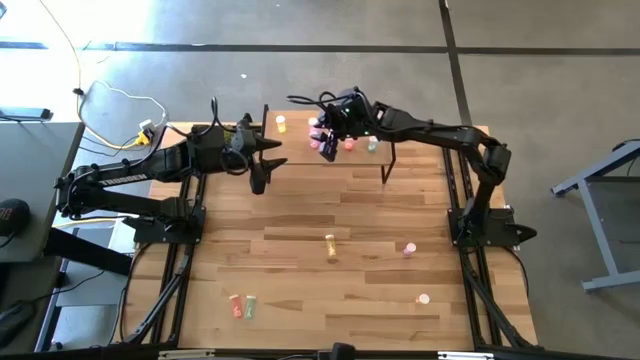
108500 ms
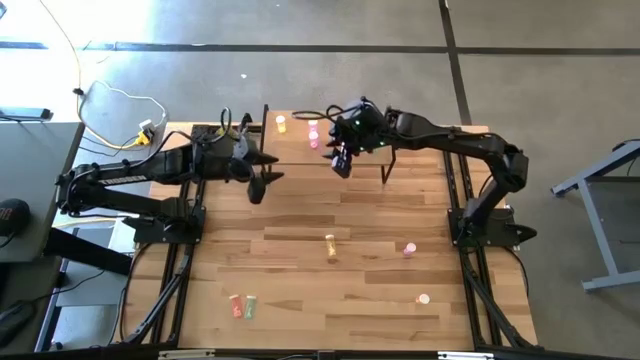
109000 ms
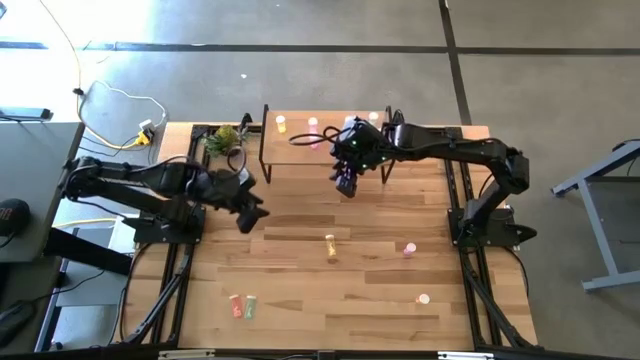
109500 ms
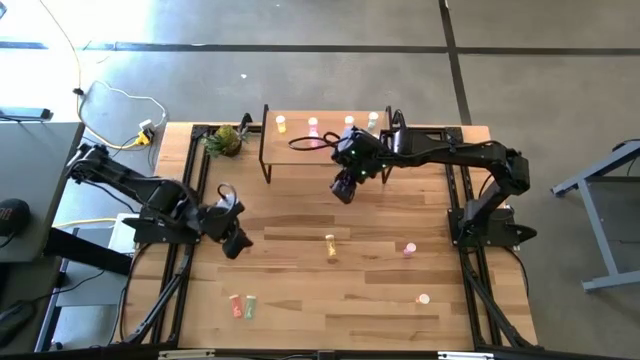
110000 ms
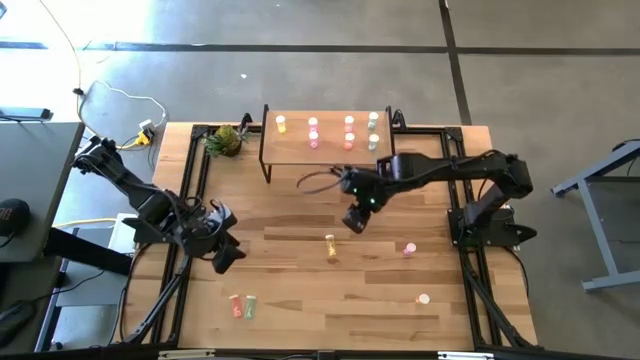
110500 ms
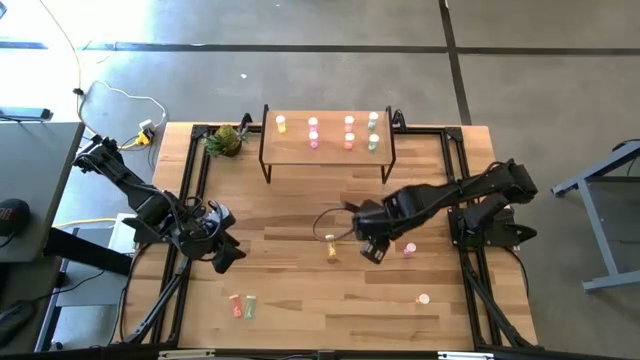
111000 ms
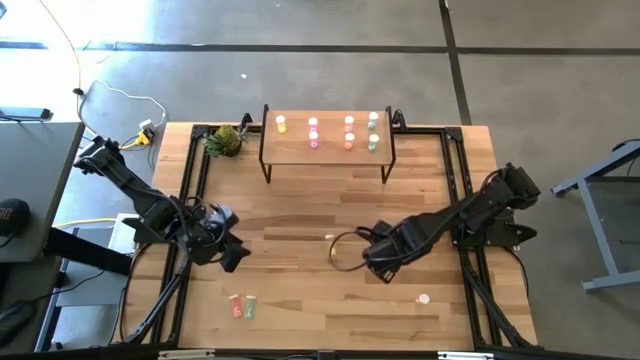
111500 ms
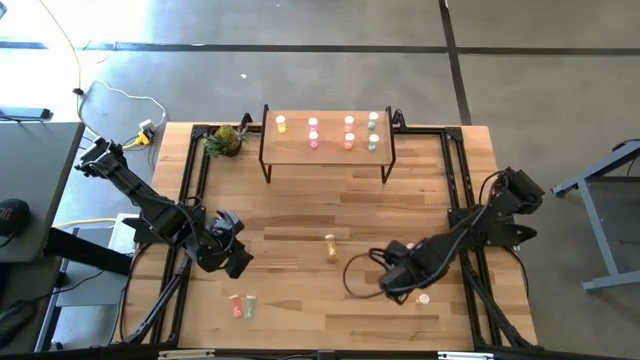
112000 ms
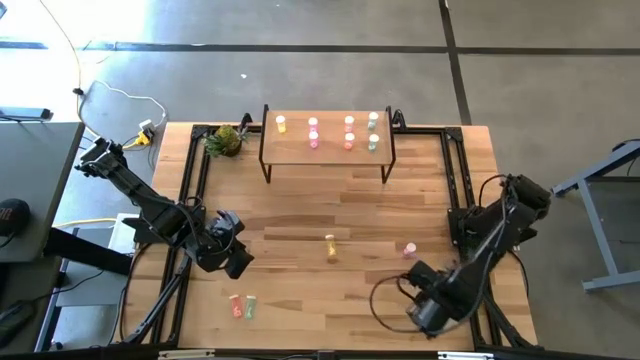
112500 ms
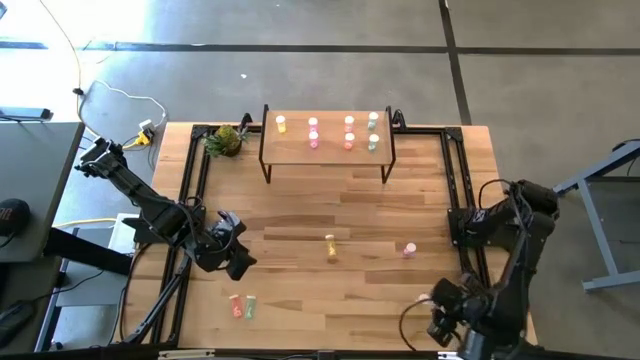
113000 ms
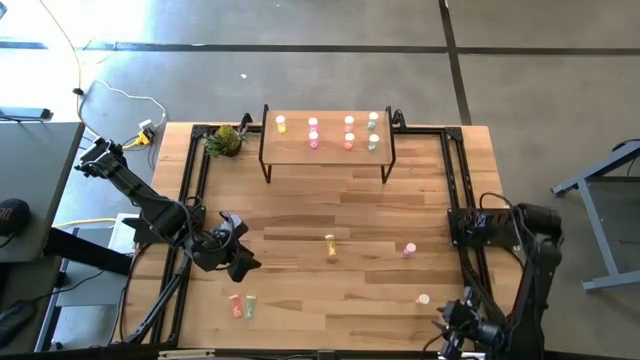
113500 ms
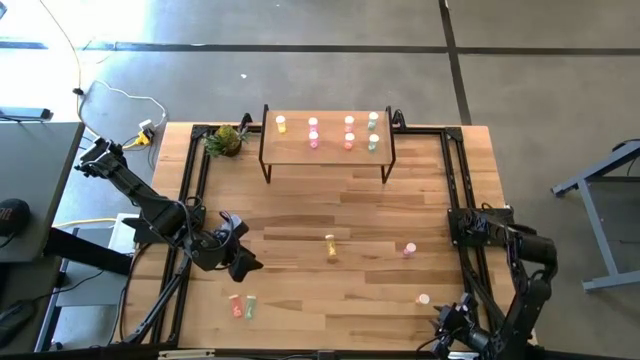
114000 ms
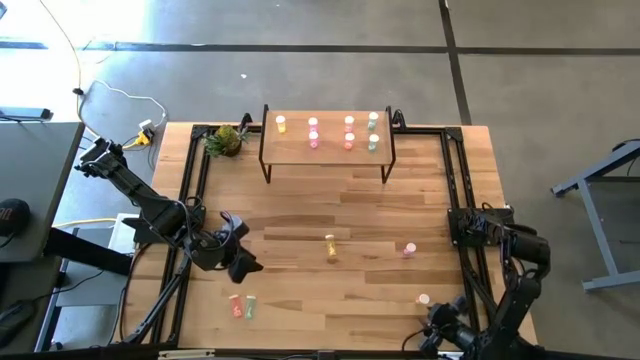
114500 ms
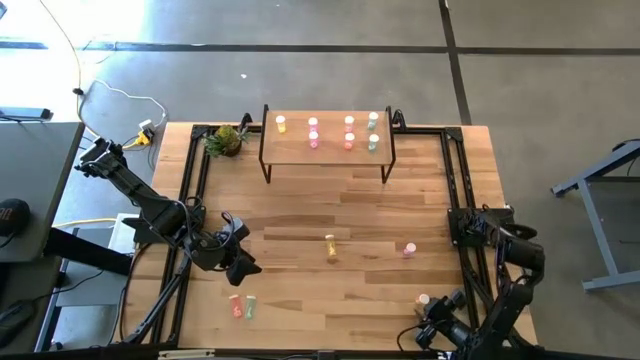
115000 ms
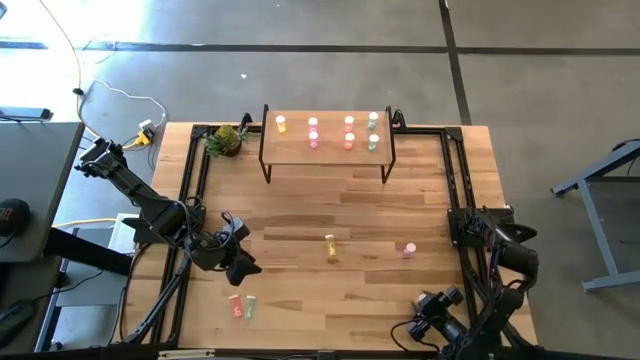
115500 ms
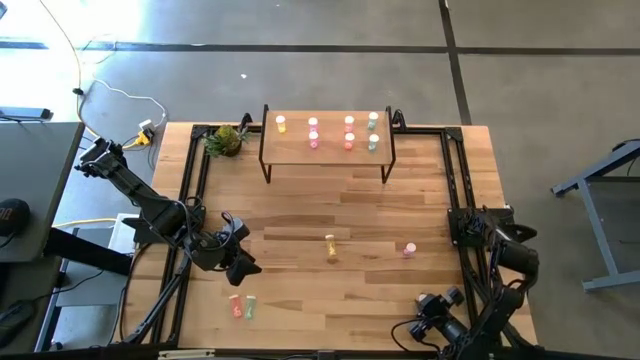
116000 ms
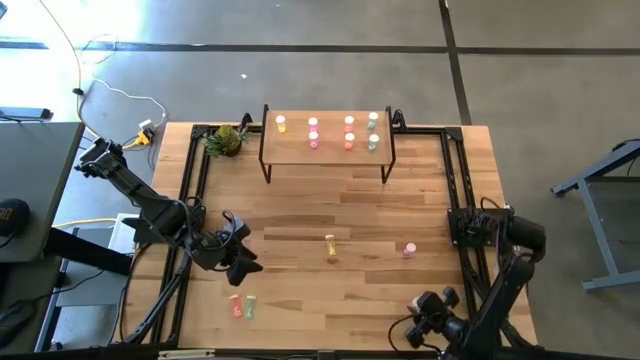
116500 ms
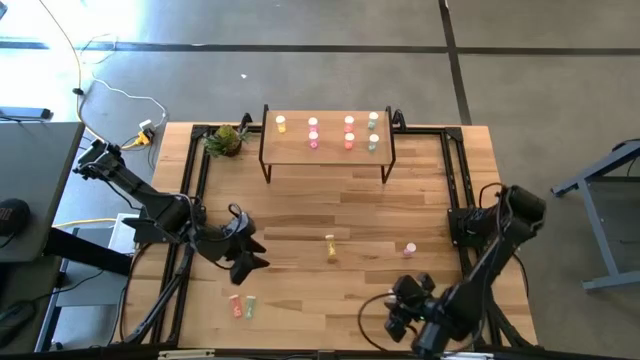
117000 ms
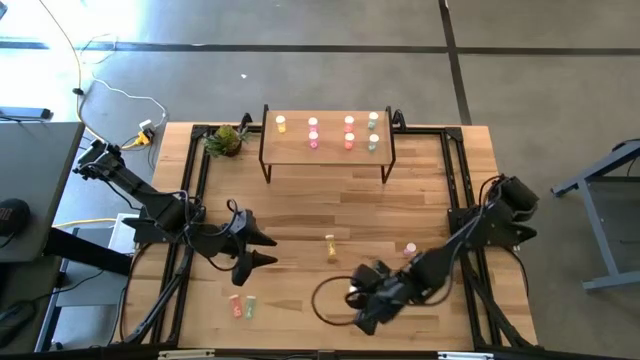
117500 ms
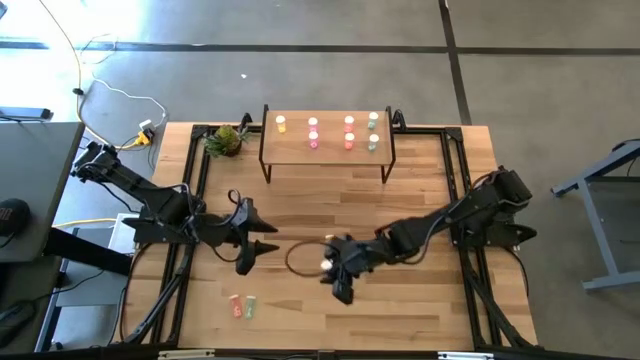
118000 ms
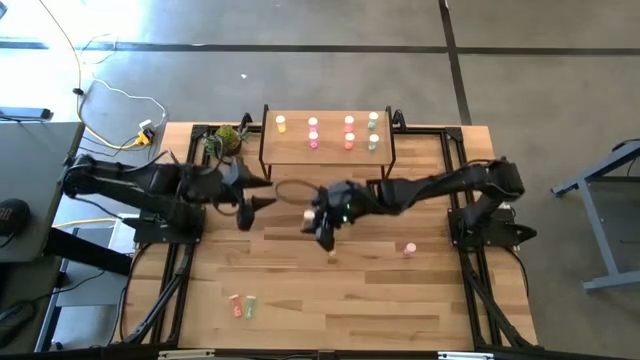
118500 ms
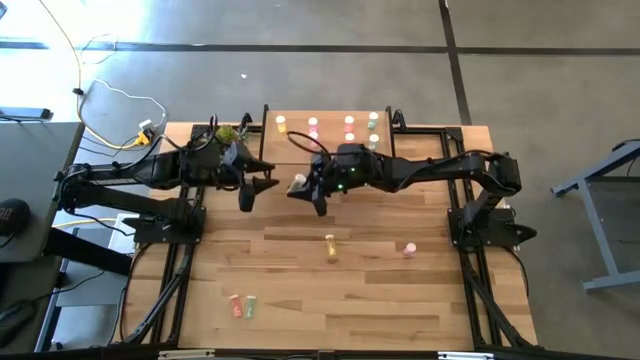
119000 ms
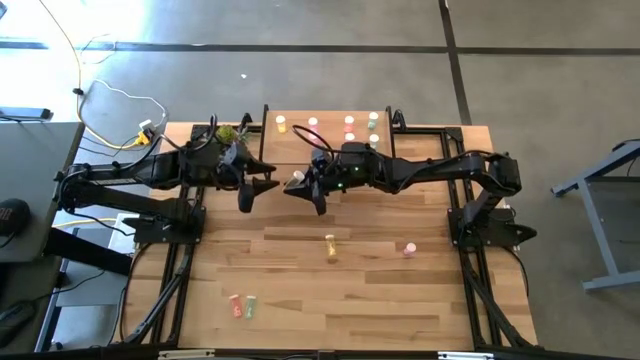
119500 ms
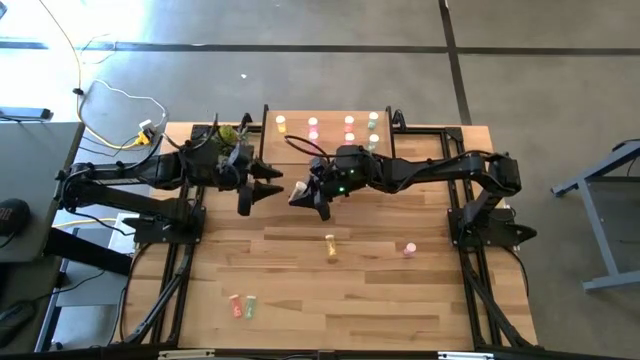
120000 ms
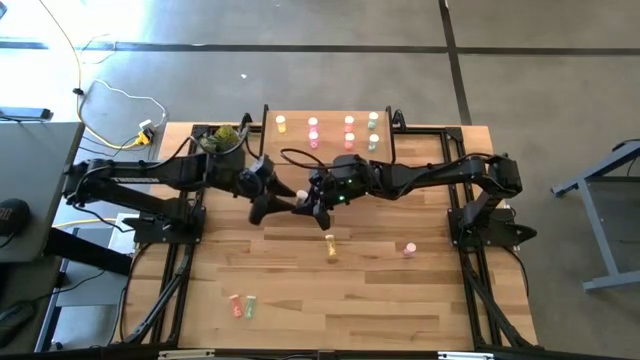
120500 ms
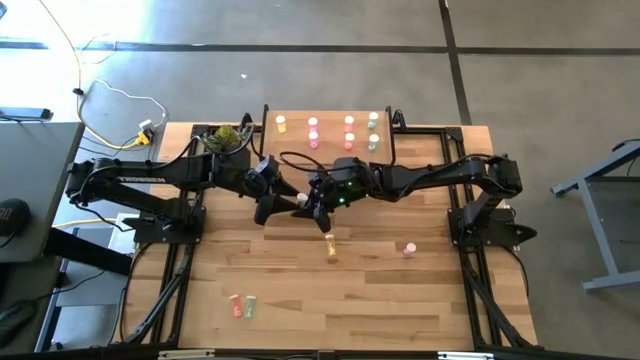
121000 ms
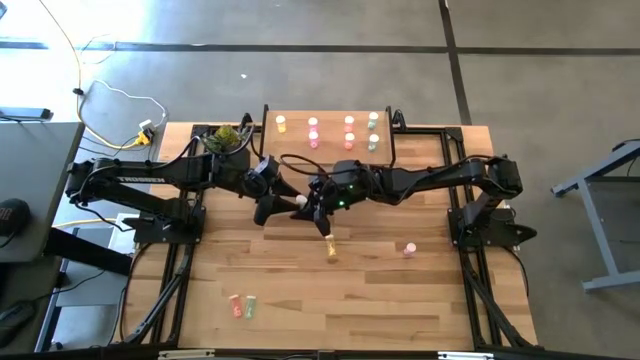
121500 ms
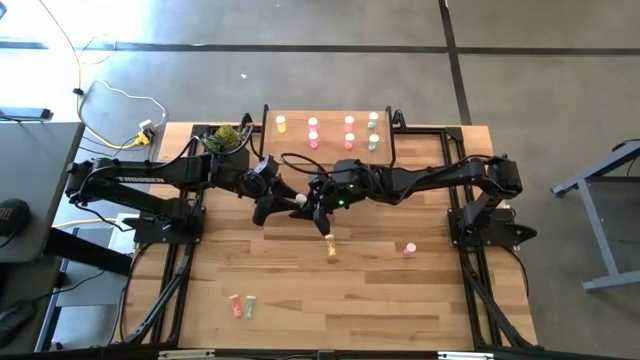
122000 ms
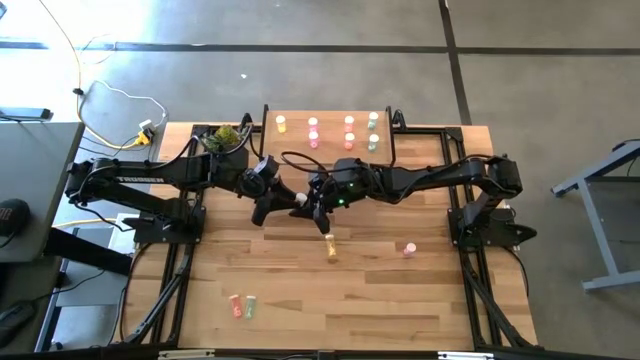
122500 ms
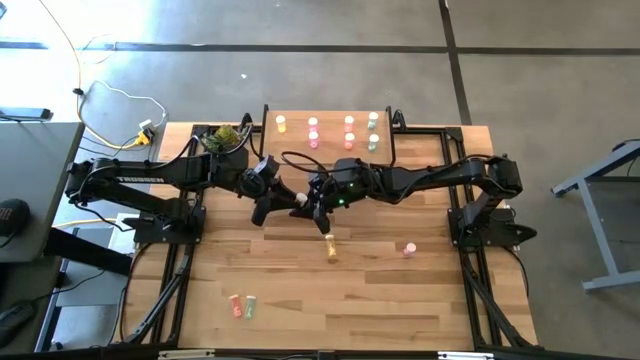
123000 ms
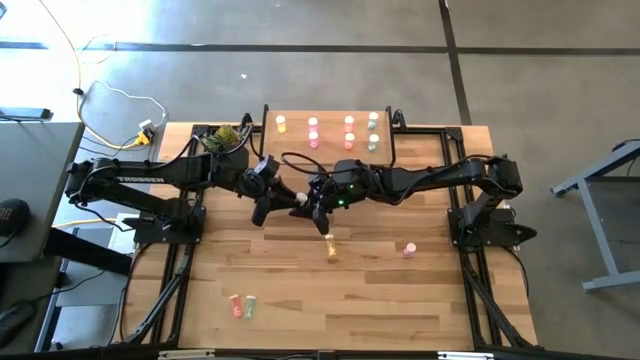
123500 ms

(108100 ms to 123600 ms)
Task: Pick and place medicine bottles onto shelf by color
Put the bottom yellow pill bottle on the shelf

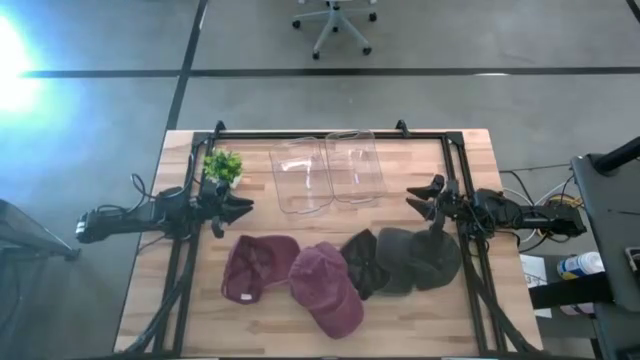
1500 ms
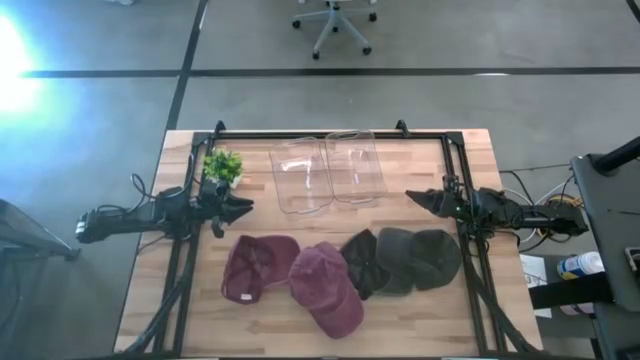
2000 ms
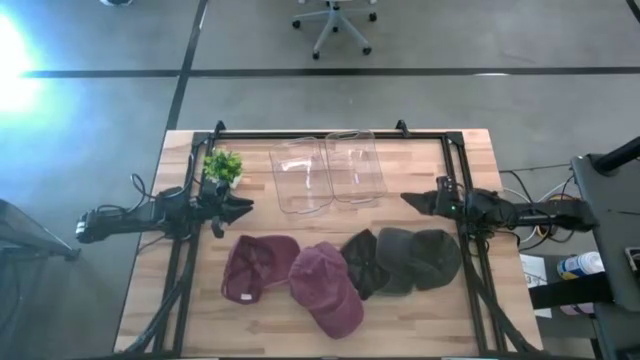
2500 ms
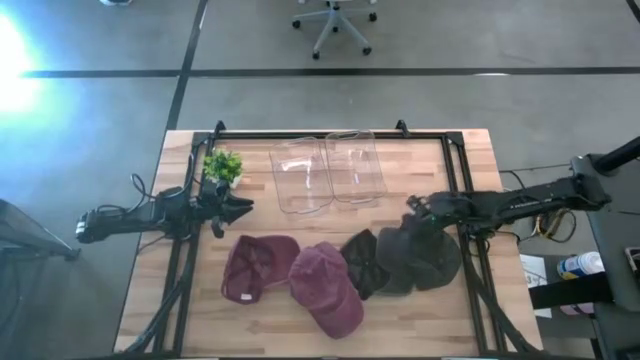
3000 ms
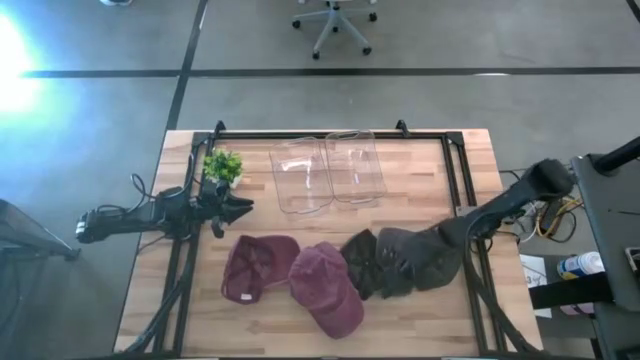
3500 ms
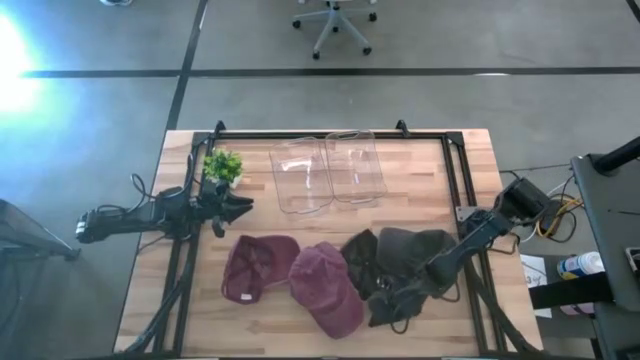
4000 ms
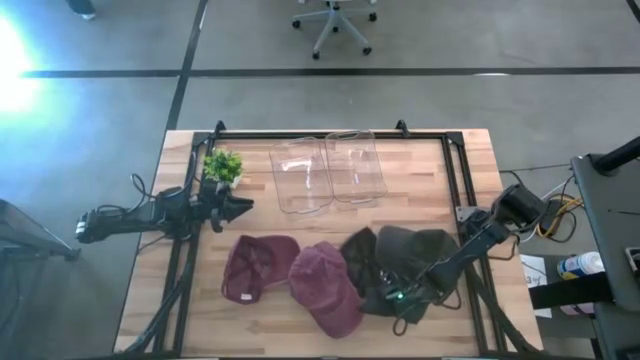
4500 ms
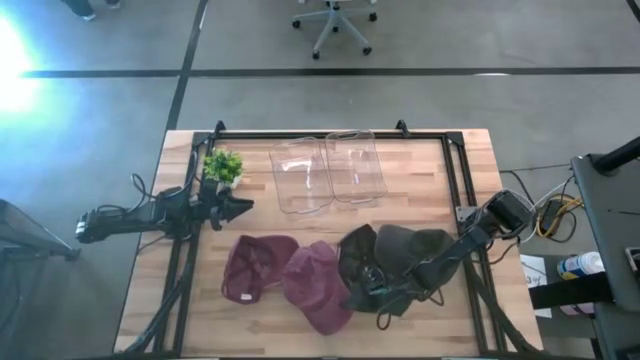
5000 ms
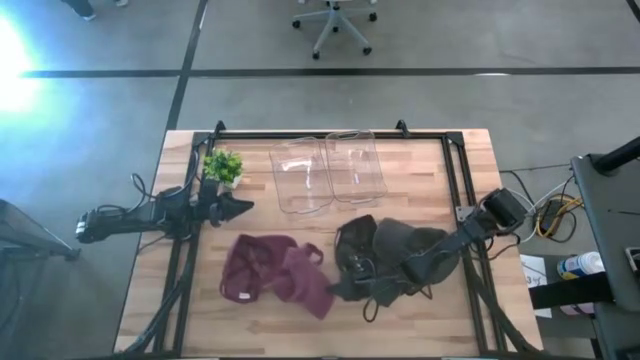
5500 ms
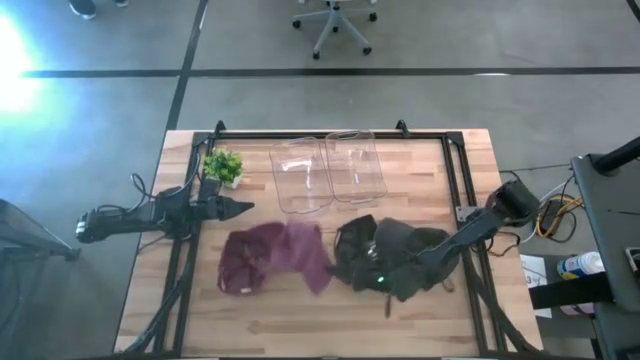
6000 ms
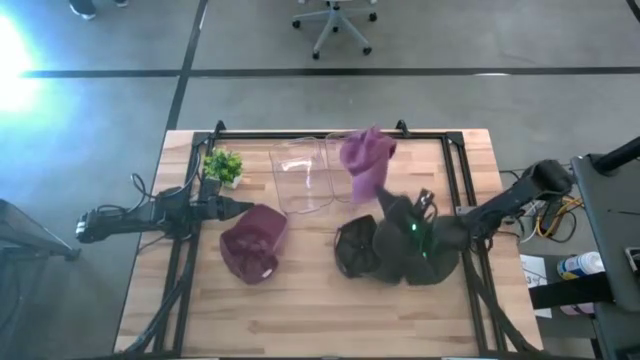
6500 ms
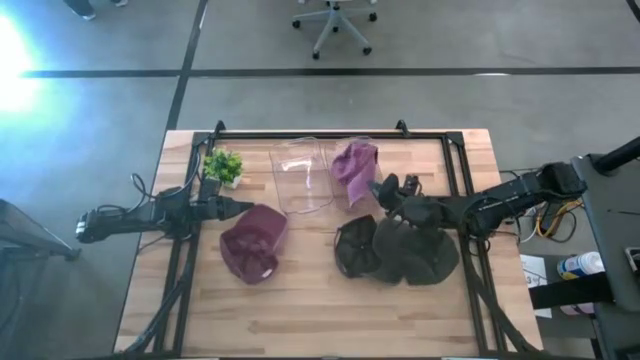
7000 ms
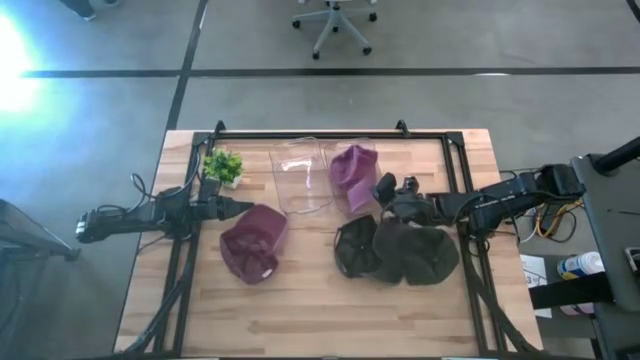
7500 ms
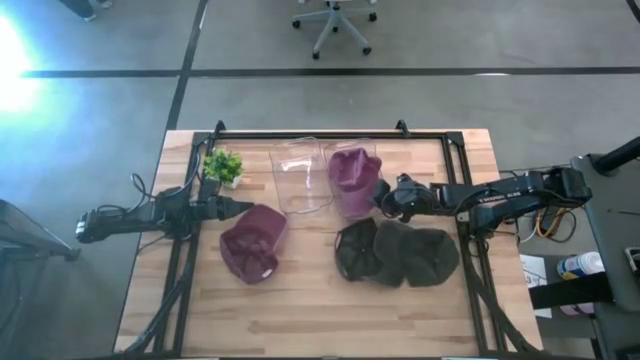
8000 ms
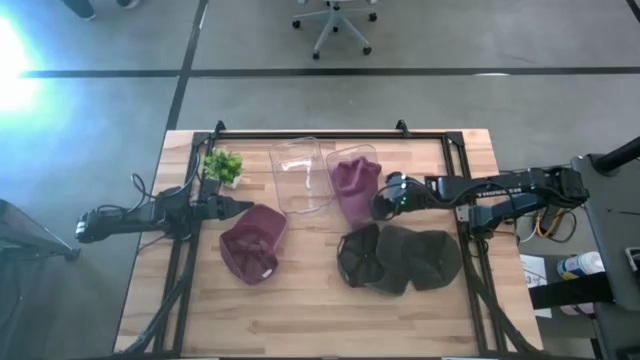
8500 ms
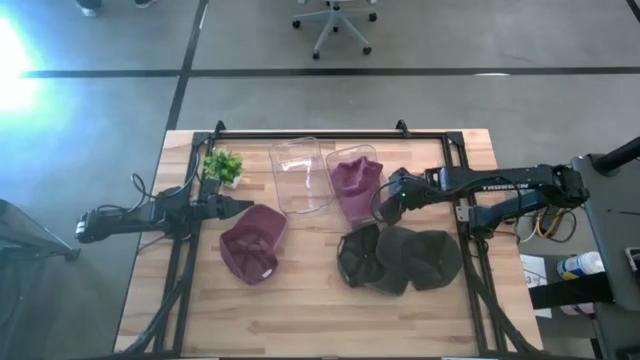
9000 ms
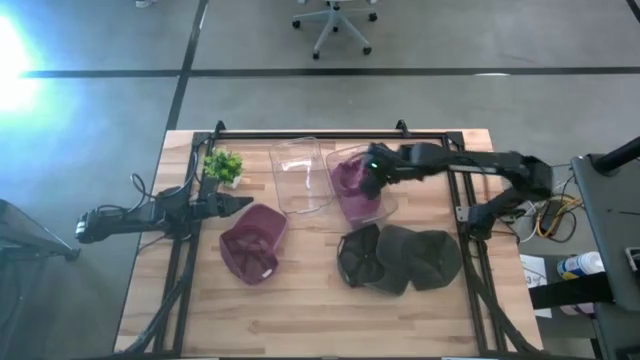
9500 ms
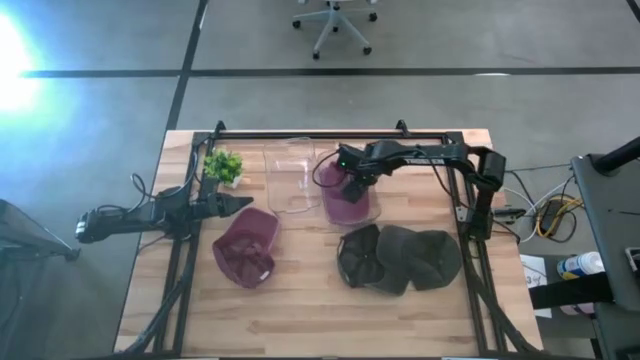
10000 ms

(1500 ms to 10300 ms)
Task: Pick & Place hat
Put the right red cap into the right transparent bin
